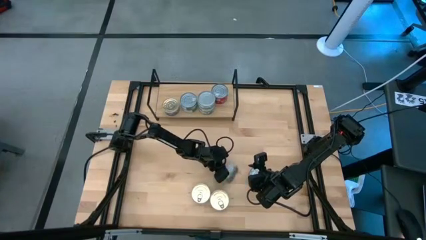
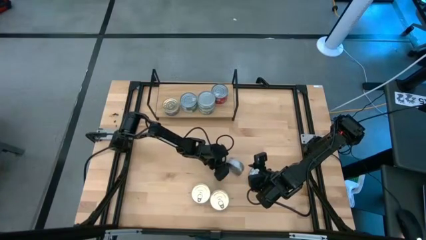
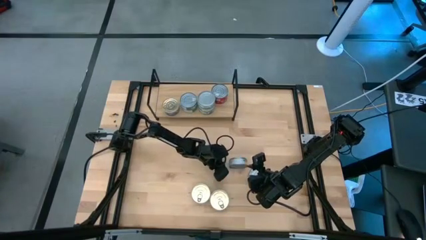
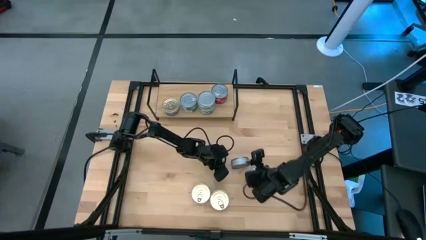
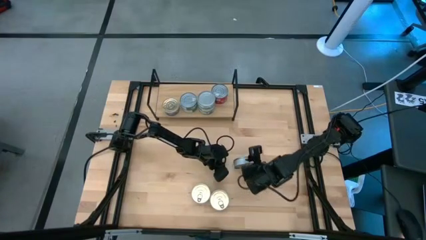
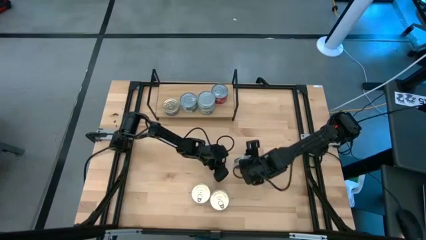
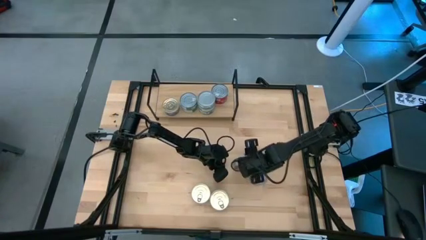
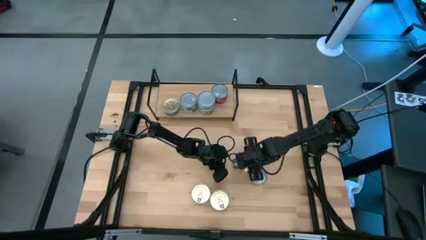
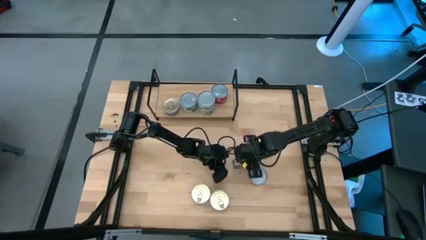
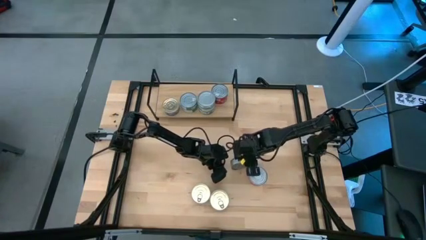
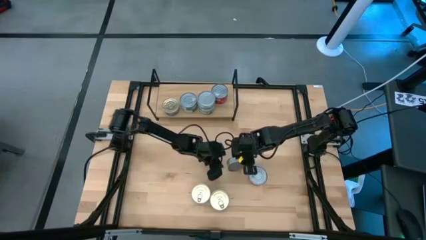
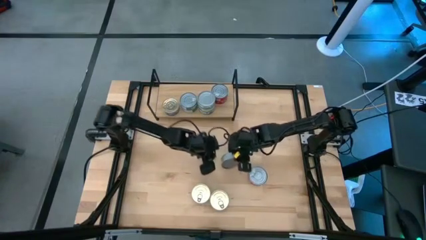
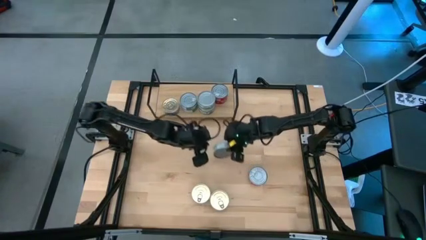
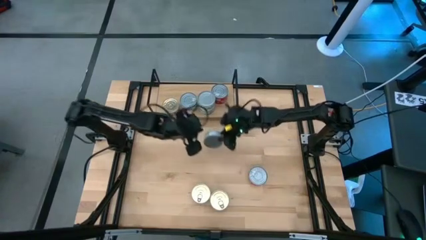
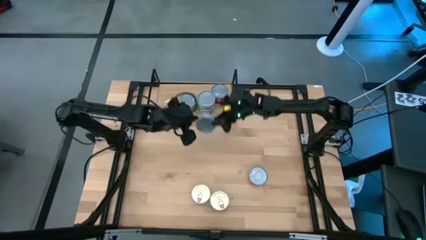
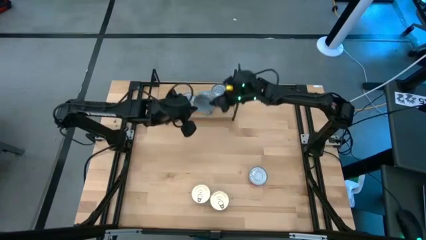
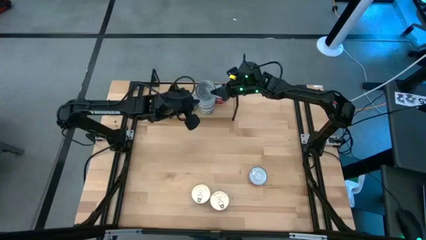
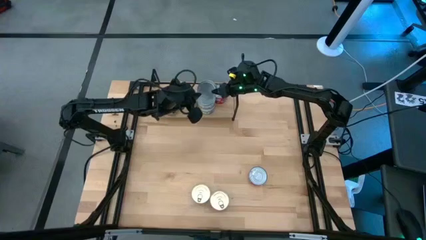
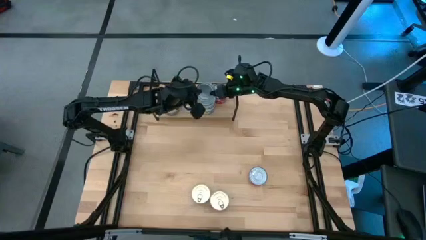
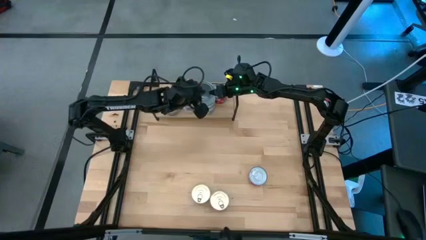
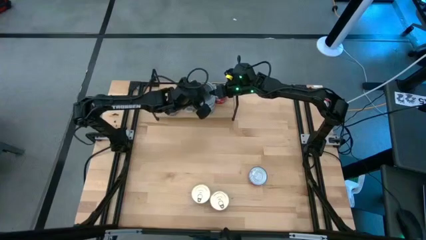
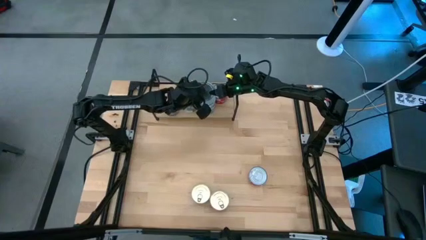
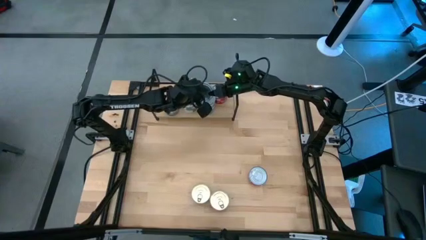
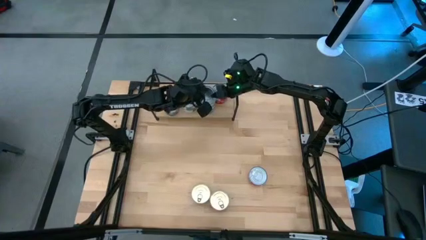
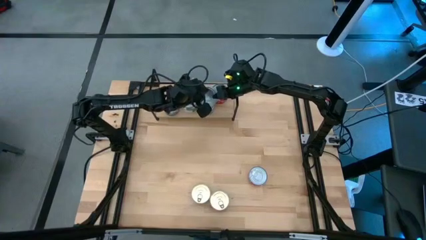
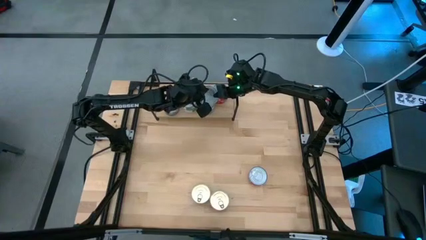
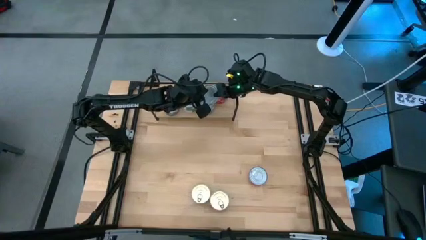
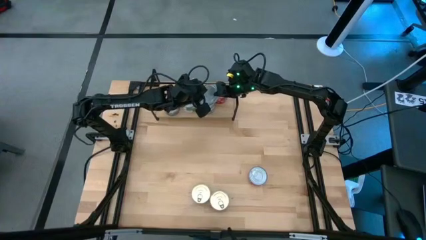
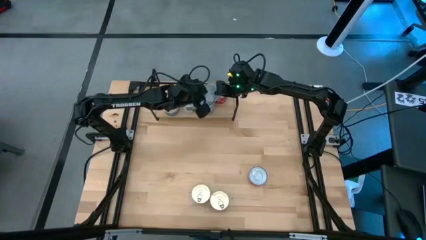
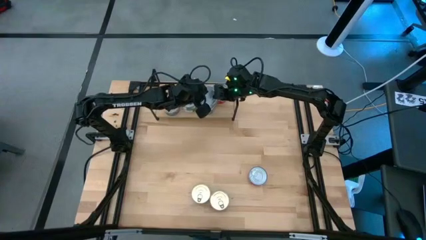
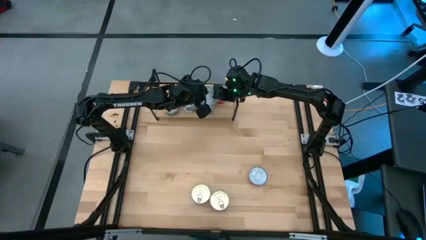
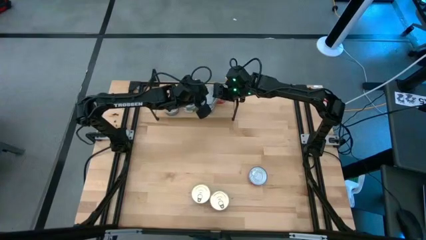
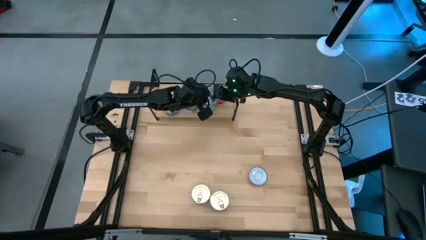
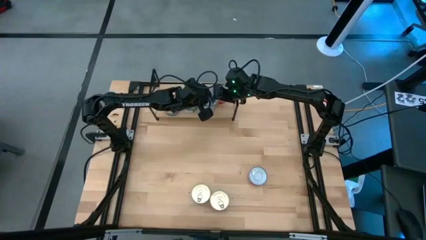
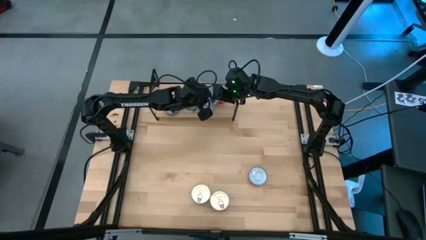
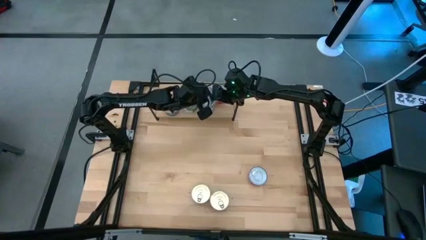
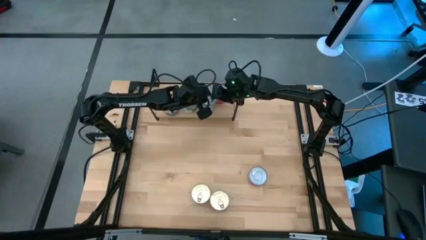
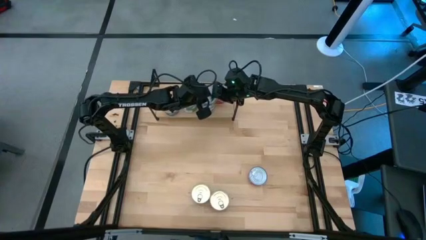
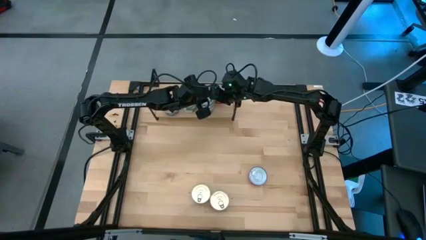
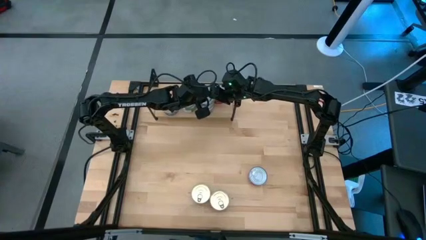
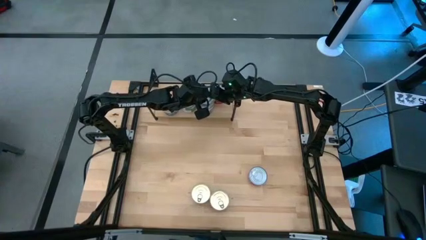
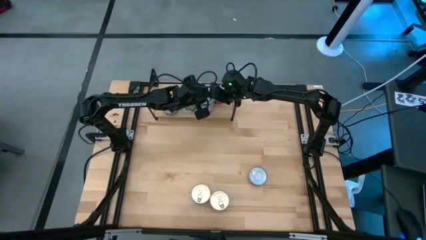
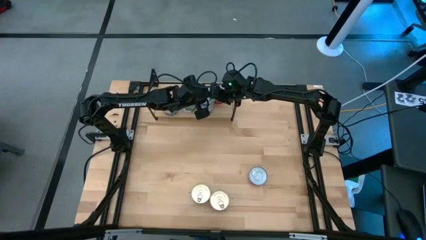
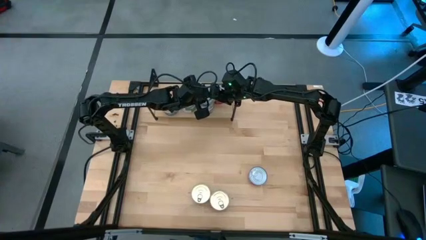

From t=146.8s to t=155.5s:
Task: Stack canned seafood by type on shelf
Stack the green white tuna can on top of the other green white tuna can on the shelf

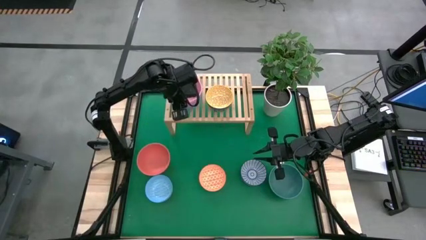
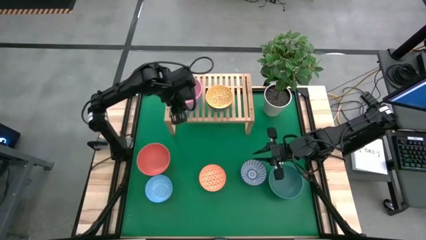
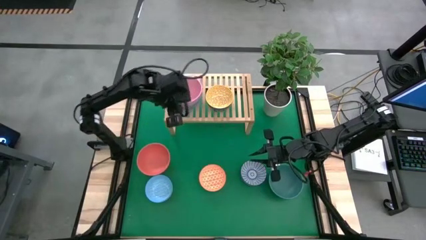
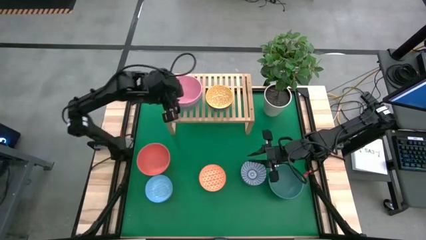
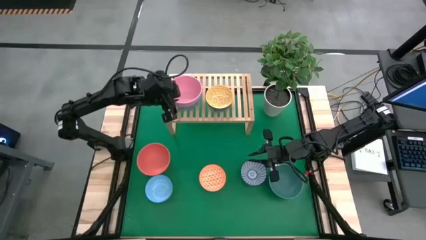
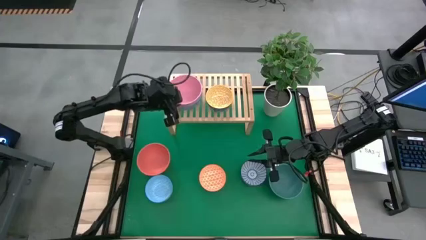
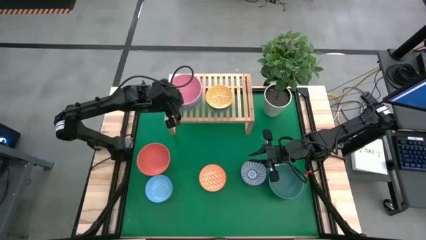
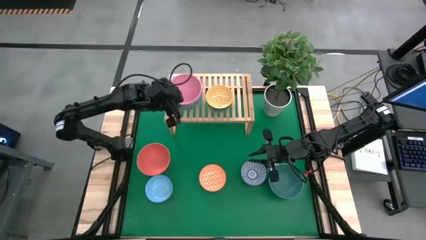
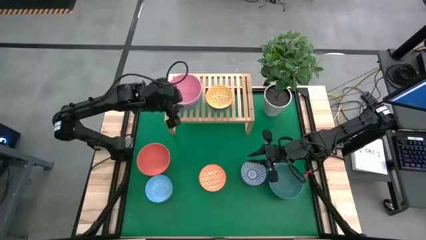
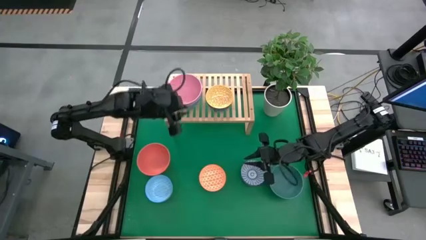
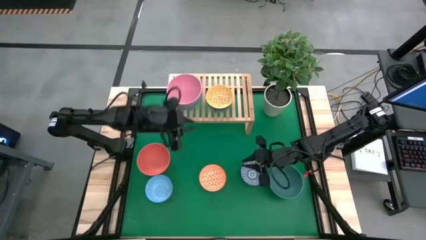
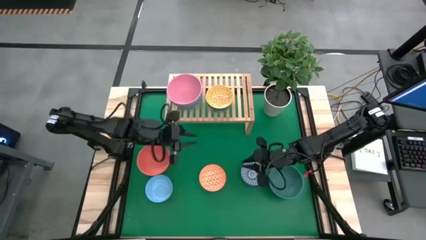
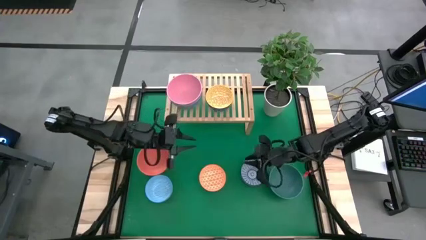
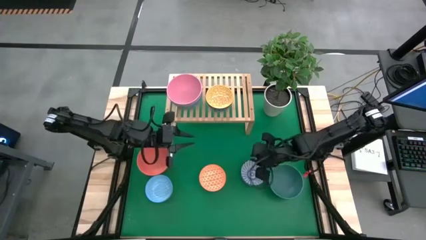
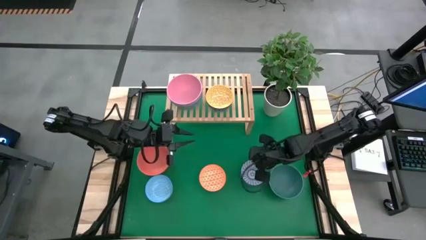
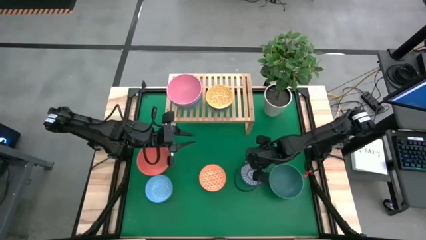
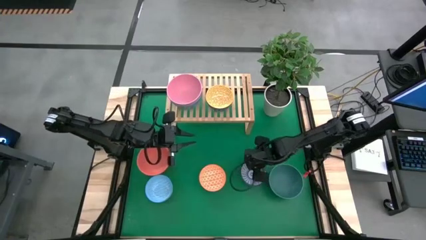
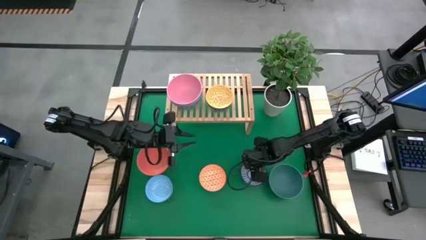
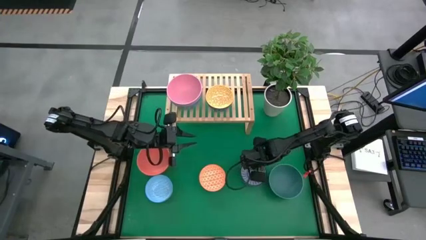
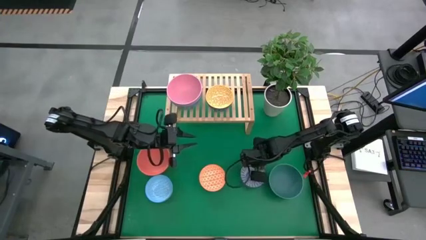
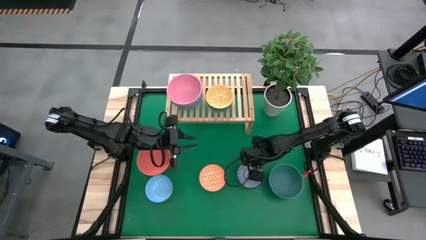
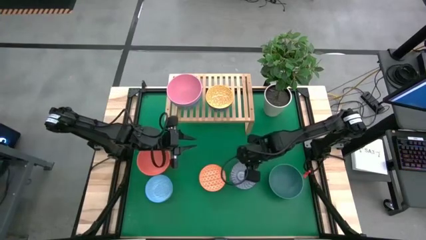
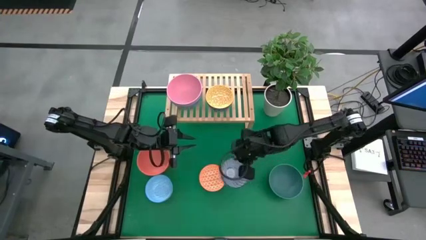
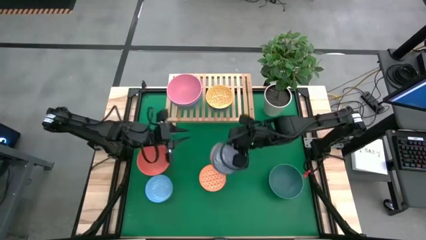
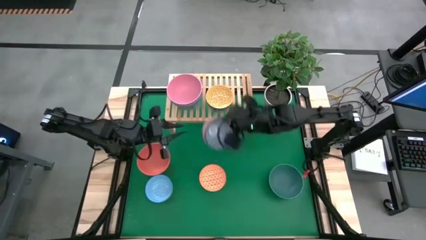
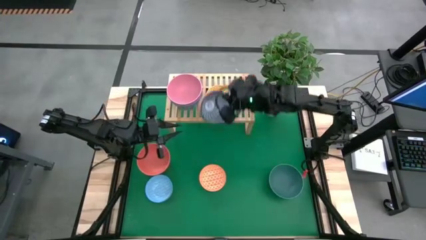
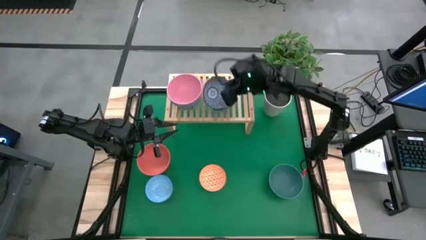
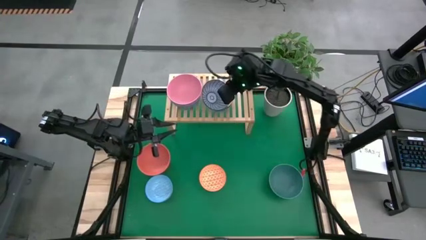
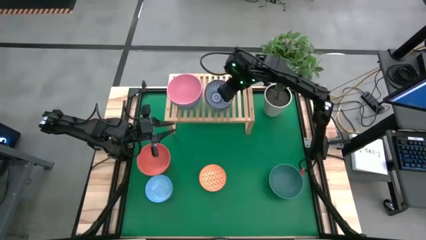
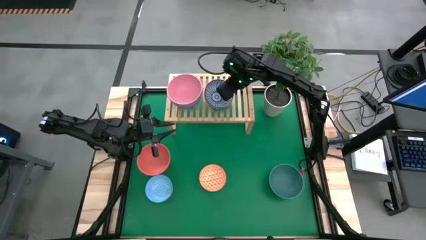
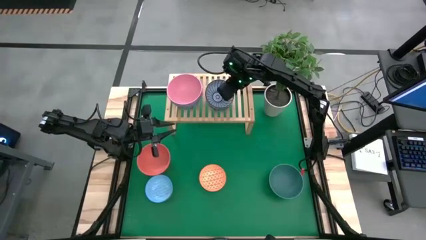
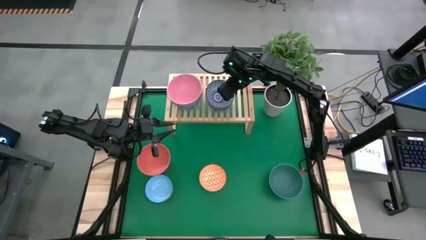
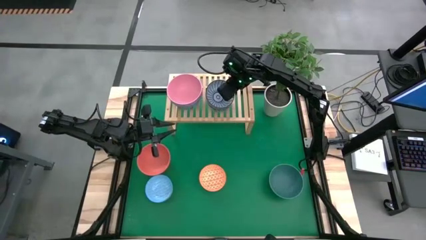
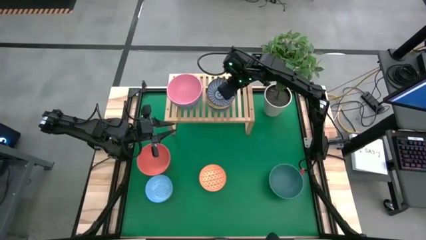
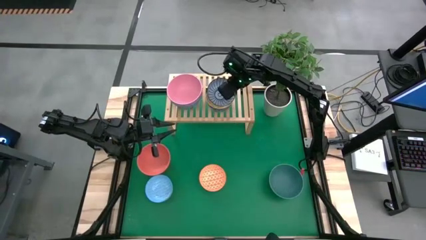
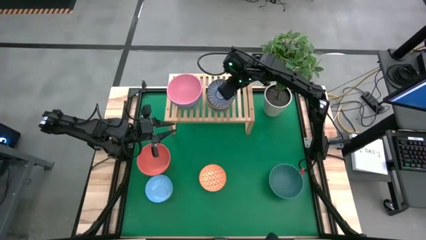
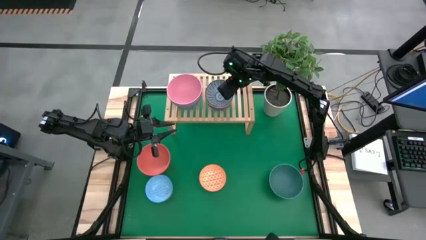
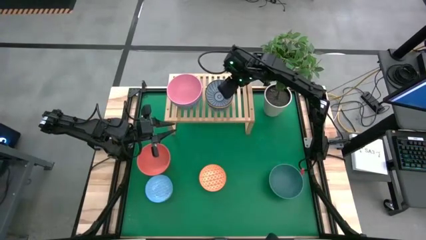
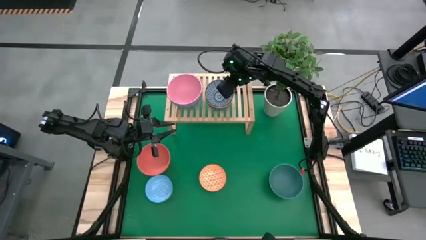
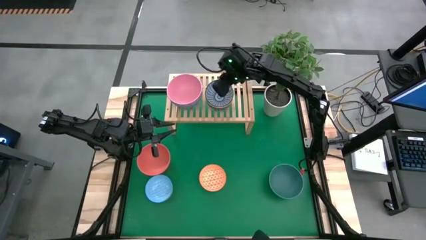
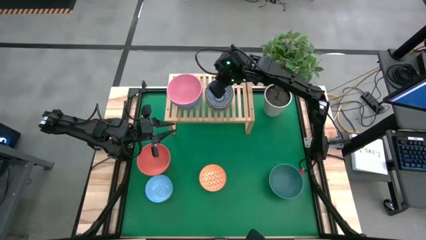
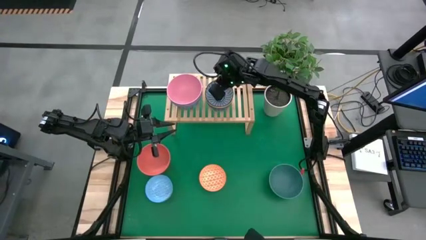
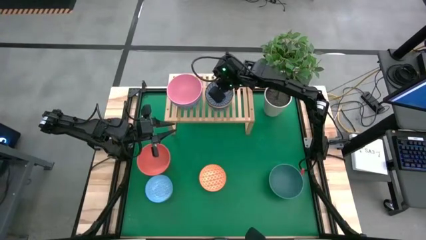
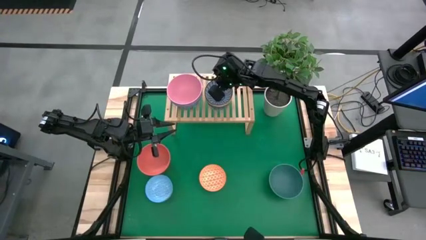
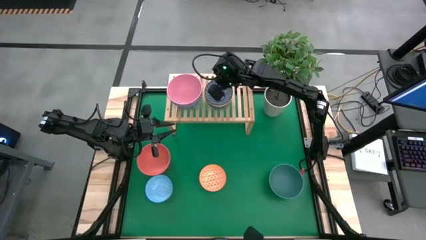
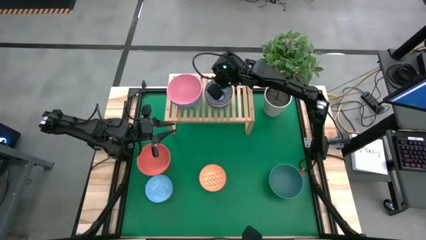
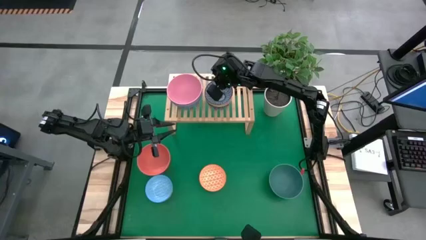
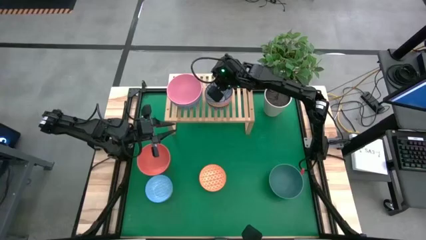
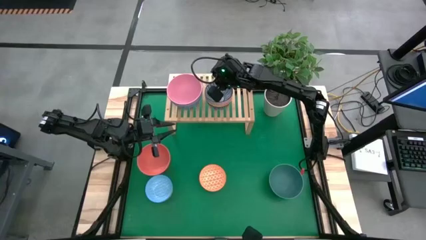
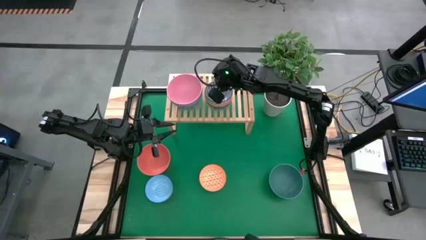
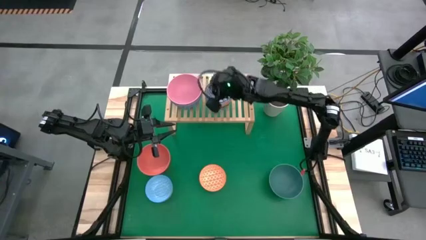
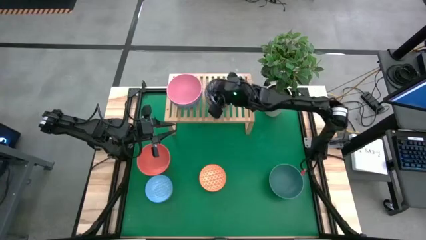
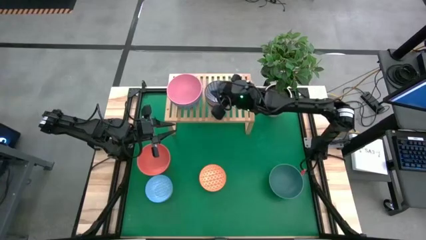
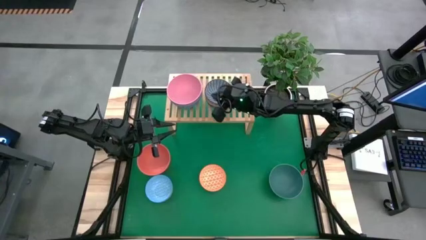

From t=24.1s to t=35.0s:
Task: Place and stack bowls onto a shelf
Stack the dark blue patterned bowl on top of the yellow patterned bowl on the shelf
